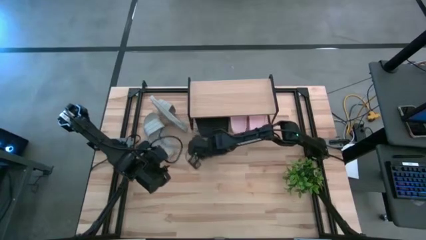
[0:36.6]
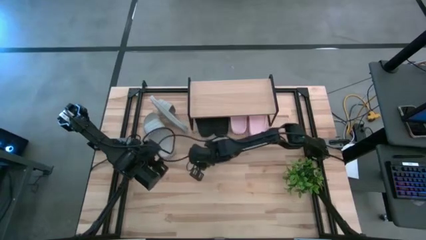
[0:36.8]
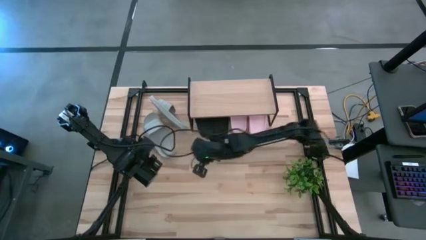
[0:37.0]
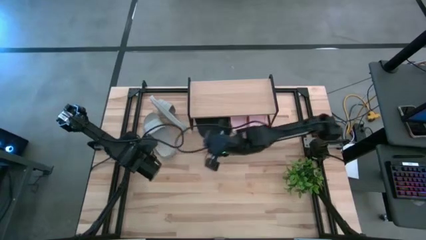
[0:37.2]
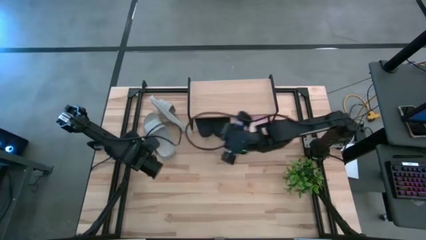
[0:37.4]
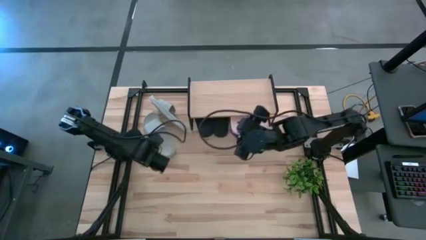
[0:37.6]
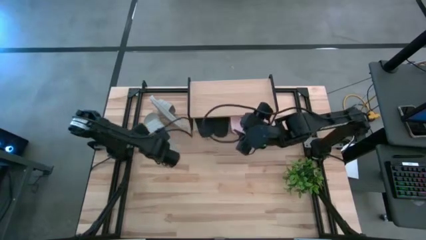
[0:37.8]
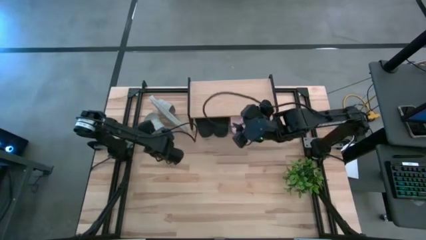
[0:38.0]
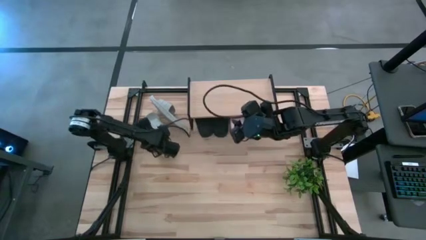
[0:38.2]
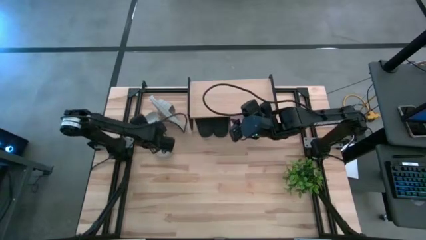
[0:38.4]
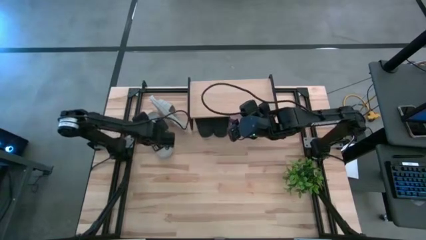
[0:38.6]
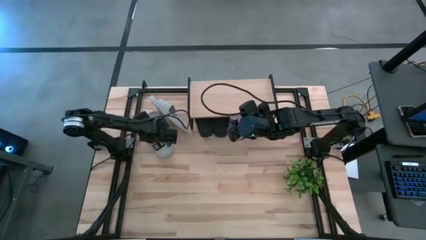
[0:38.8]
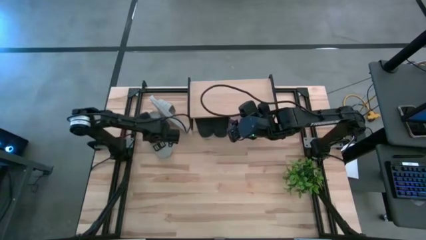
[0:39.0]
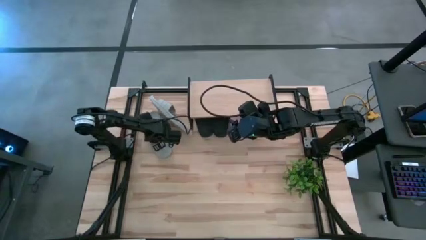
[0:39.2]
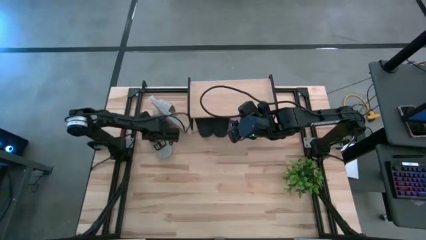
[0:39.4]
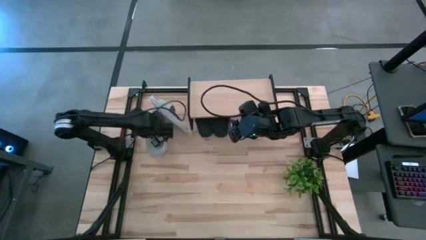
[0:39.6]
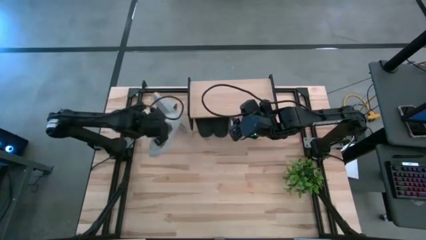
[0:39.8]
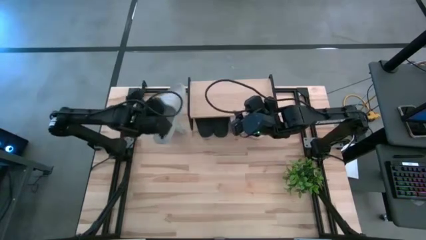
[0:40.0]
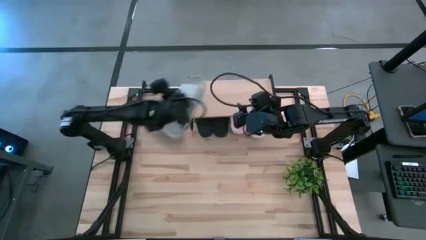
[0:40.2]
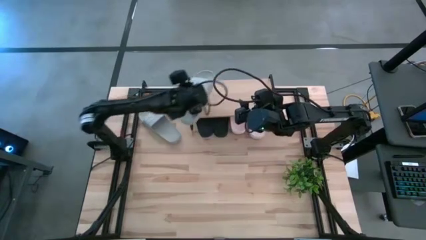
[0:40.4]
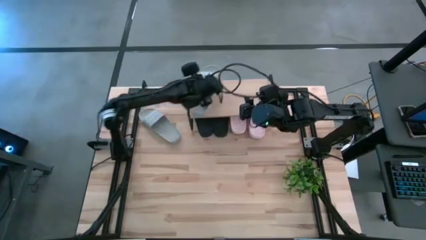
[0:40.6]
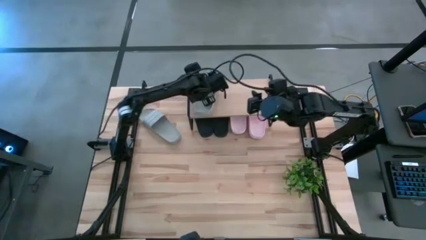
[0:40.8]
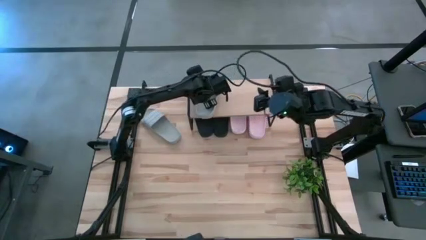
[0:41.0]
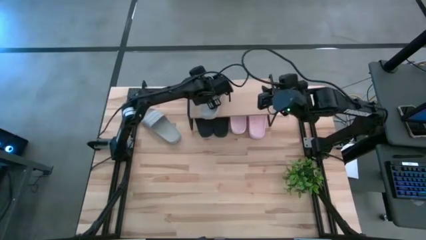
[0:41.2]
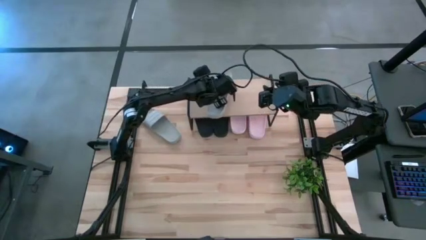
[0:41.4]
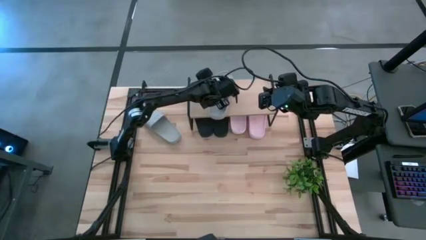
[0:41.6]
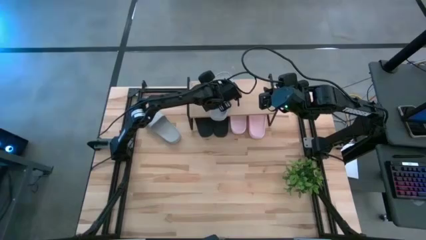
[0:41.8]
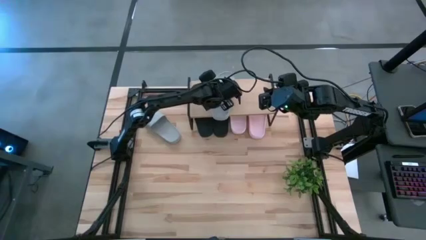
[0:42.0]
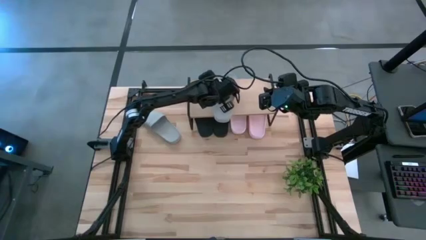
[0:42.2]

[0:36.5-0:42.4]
Task: Pick and place slides into the shelf
Put the left gray slide on the shelf

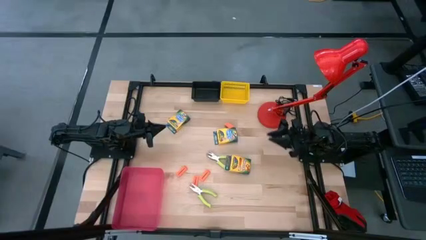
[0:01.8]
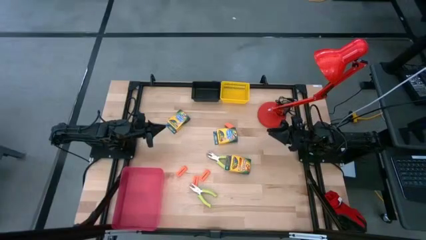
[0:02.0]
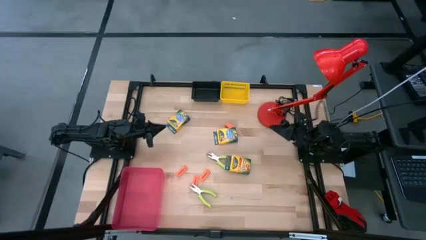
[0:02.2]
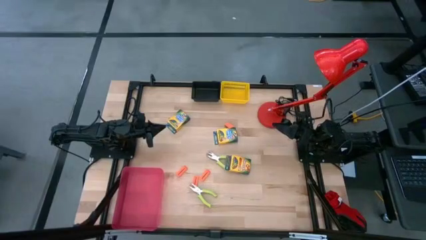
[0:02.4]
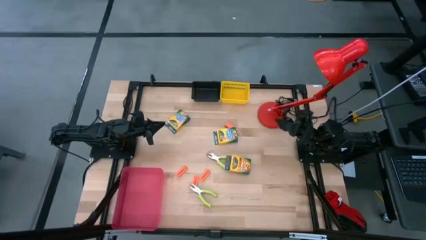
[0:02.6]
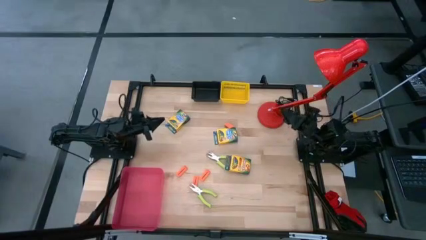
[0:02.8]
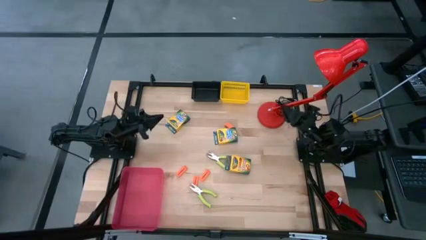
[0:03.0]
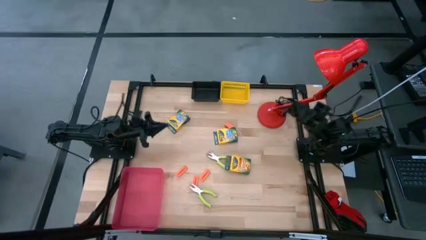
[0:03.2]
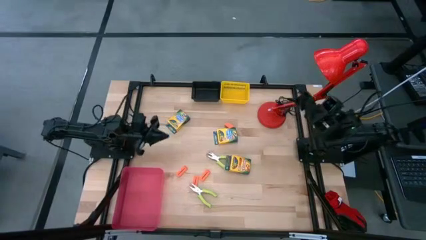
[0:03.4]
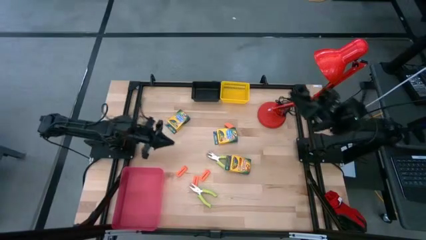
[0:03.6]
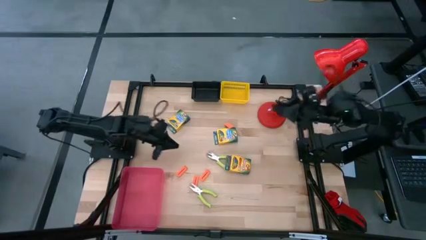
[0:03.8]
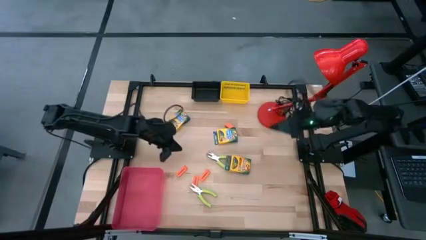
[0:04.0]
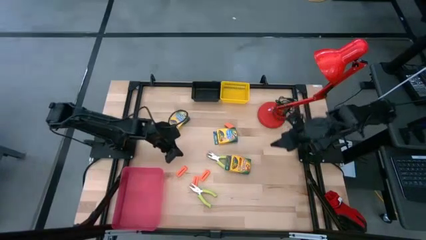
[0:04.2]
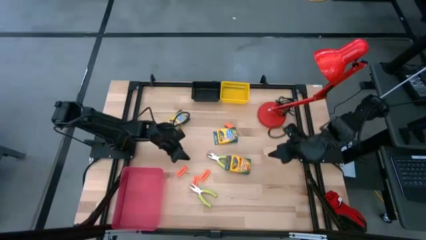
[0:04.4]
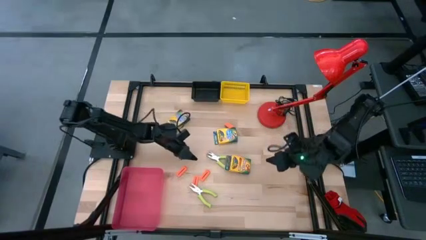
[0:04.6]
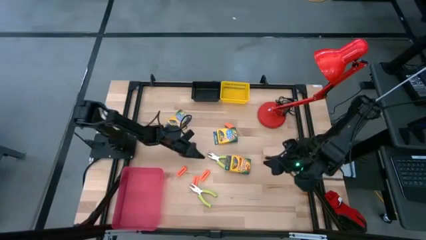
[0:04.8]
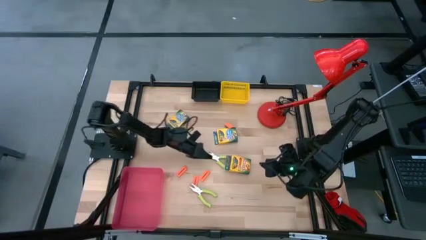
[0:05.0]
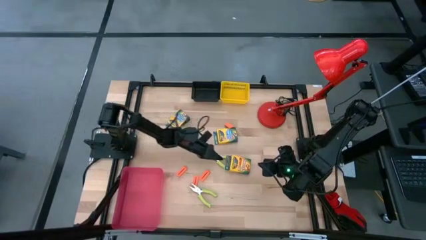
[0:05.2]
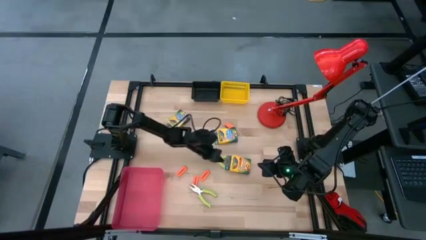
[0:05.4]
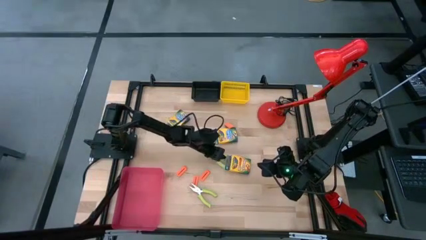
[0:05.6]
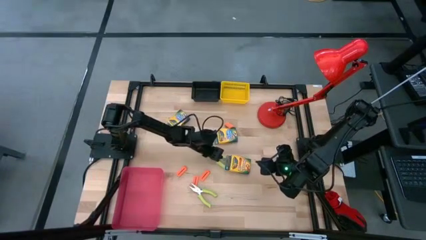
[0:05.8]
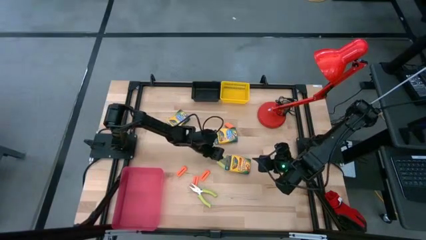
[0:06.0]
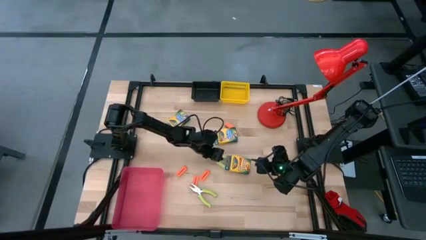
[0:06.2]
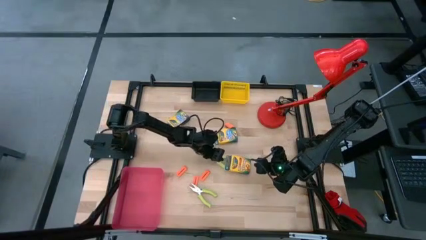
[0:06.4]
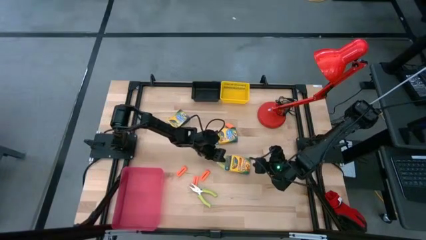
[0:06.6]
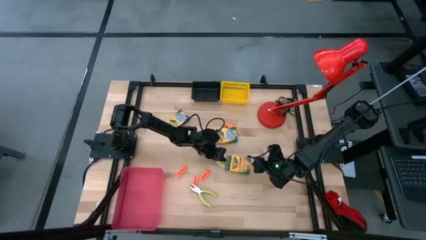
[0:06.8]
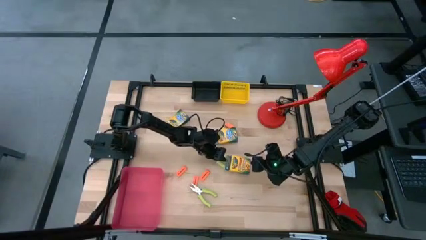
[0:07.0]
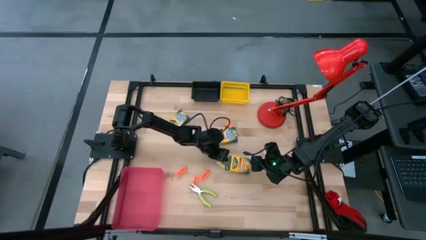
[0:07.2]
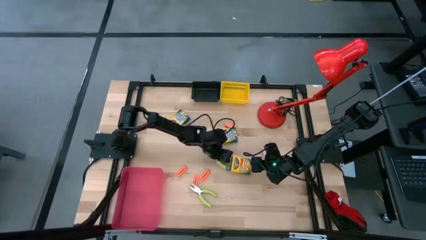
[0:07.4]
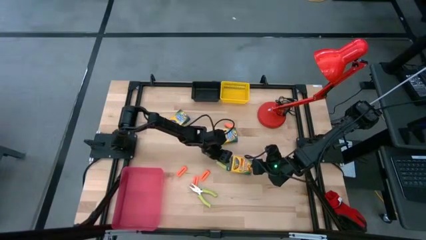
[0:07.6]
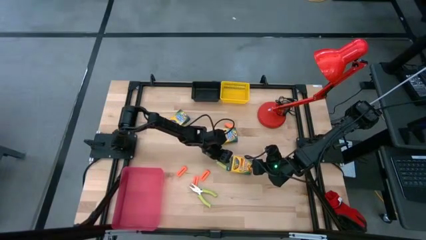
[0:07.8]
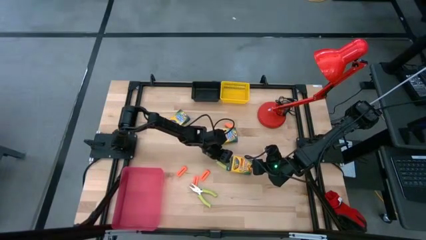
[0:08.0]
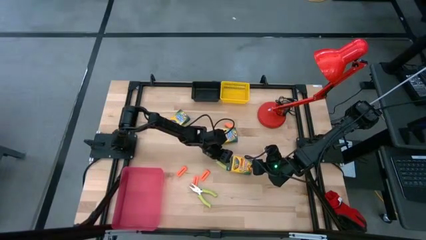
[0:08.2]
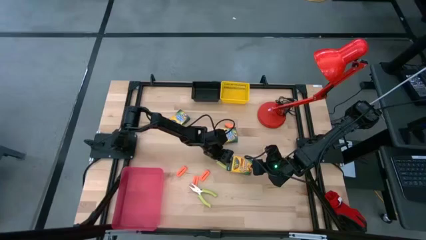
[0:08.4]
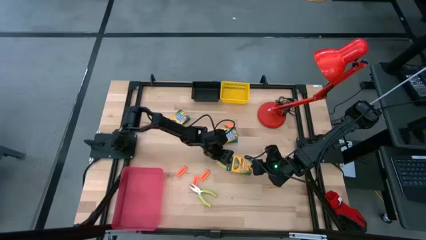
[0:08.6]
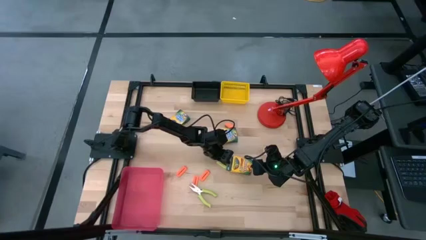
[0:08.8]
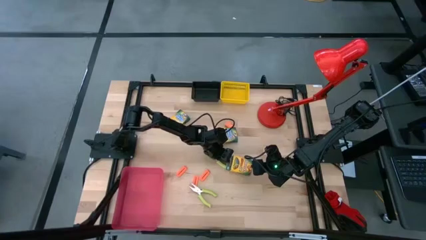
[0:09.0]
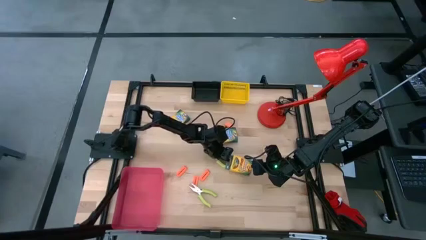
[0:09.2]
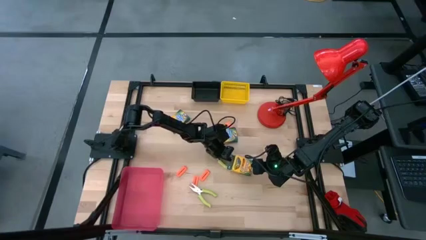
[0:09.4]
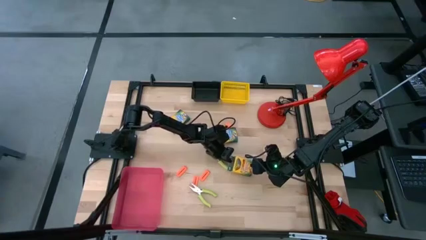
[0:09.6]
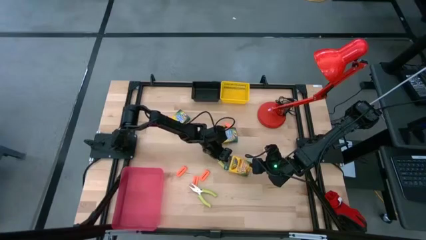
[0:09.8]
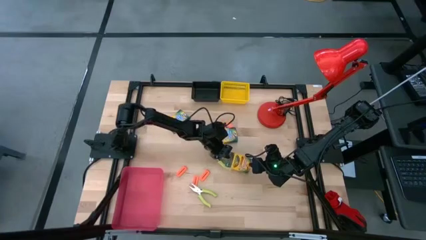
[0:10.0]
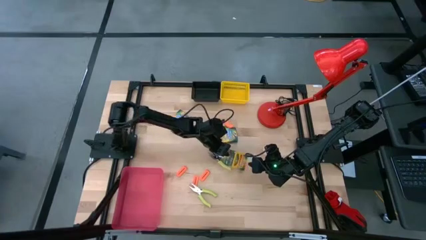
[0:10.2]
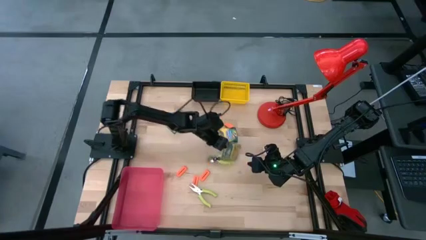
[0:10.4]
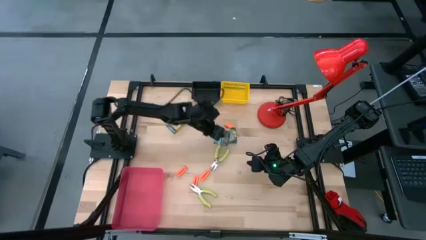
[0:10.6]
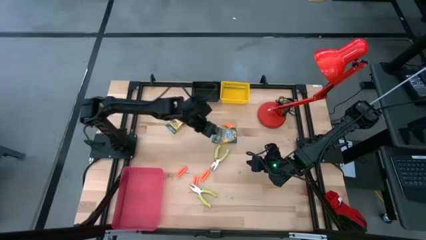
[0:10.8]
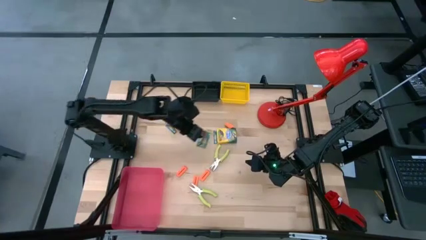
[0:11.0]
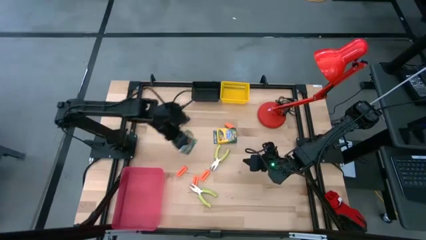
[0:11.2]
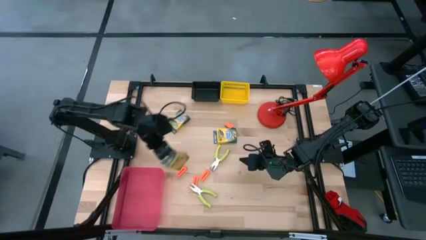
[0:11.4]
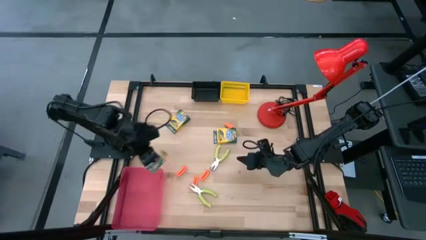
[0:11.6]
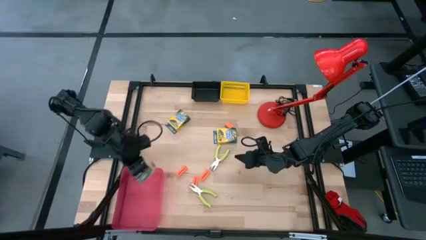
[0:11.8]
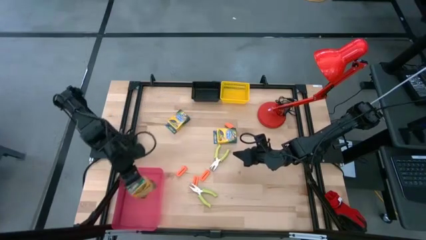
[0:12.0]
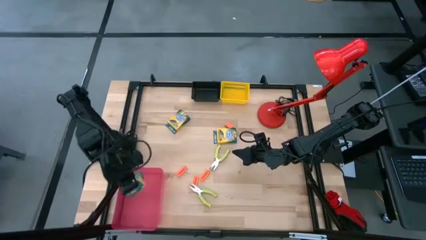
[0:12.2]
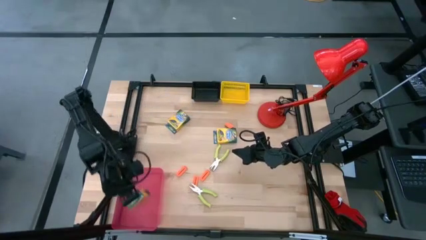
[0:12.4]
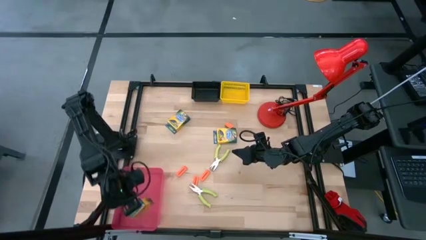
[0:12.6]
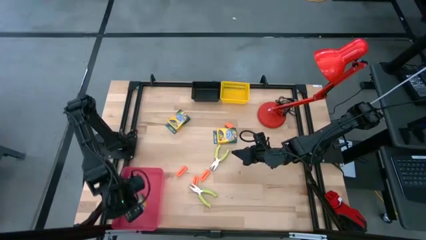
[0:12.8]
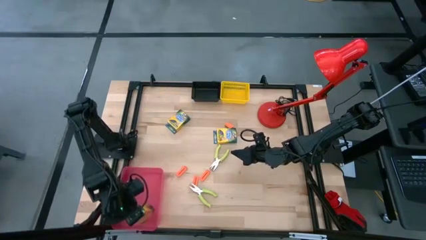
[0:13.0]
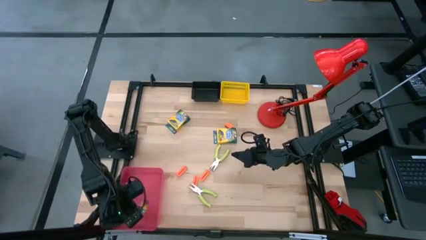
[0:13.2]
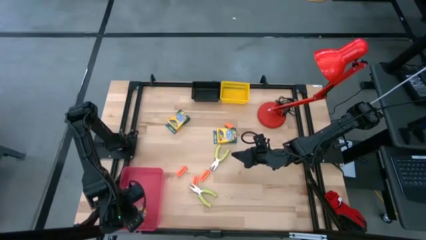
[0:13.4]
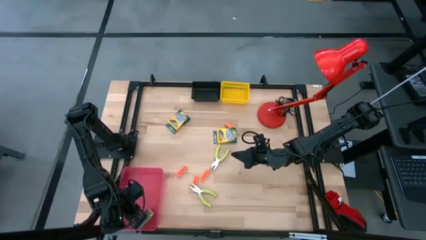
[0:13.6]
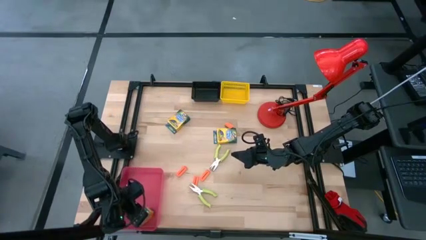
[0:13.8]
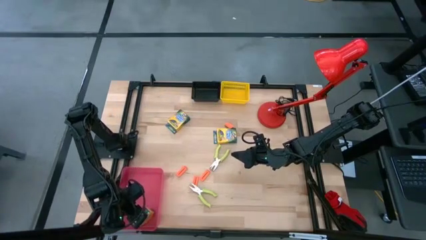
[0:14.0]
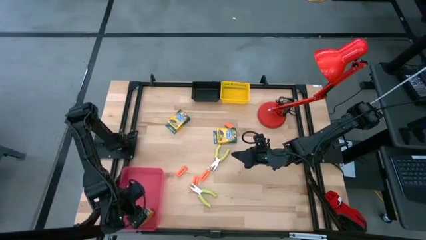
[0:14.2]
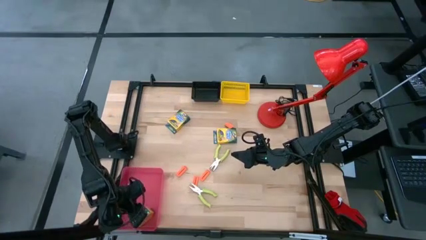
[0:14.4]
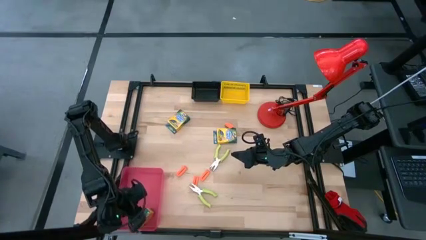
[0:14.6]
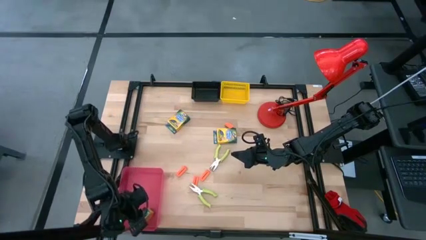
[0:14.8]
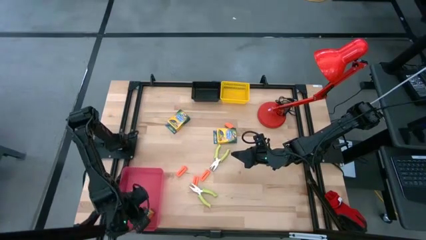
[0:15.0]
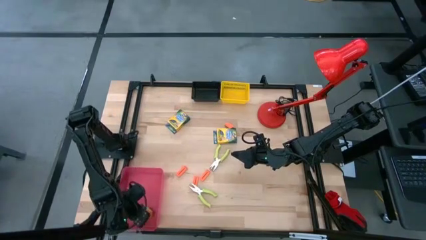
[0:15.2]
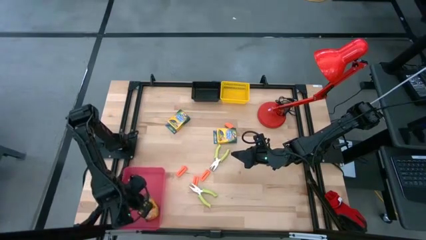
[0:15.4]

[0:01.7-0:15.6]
Task: Pick & Place School Supplies
Put the crayon box into the red bin
